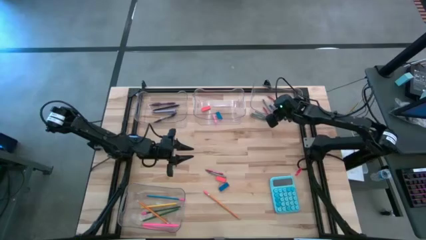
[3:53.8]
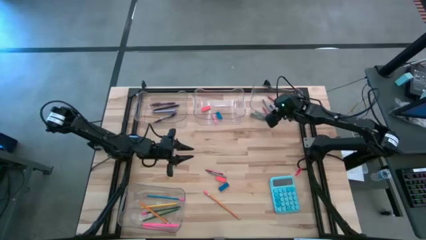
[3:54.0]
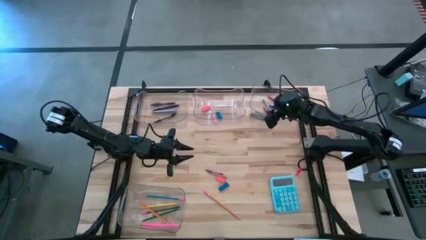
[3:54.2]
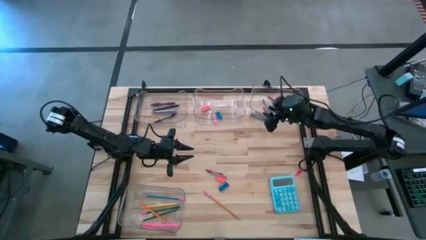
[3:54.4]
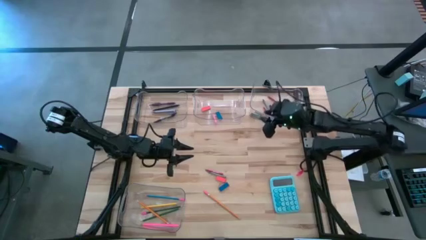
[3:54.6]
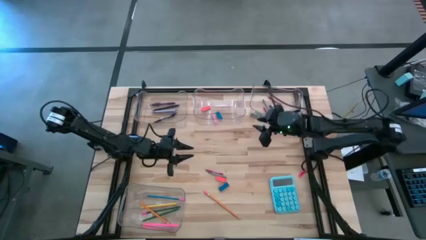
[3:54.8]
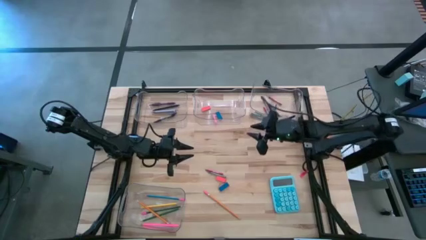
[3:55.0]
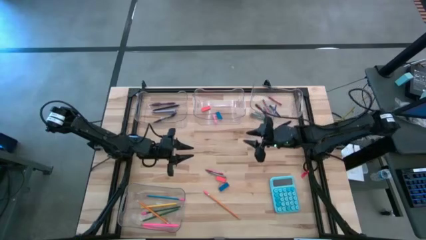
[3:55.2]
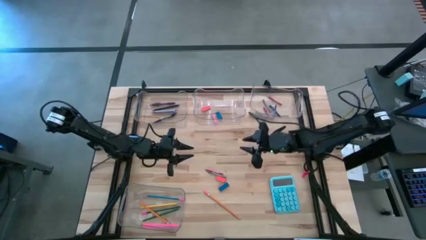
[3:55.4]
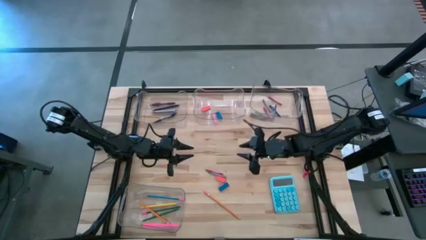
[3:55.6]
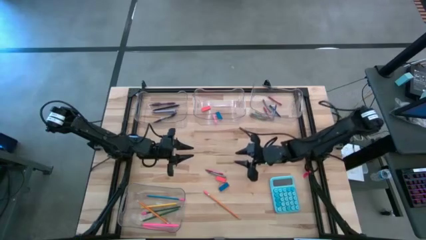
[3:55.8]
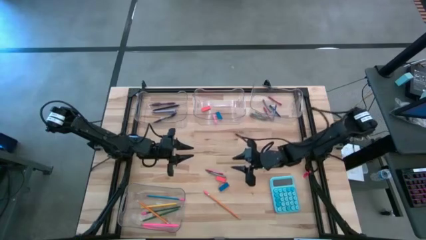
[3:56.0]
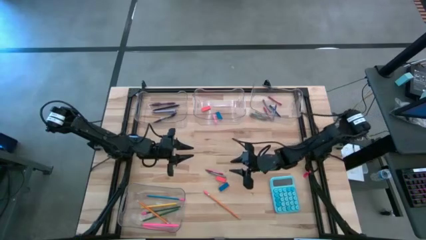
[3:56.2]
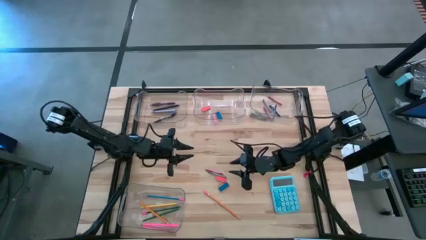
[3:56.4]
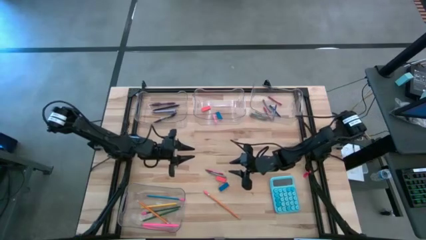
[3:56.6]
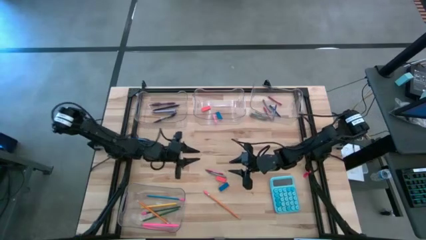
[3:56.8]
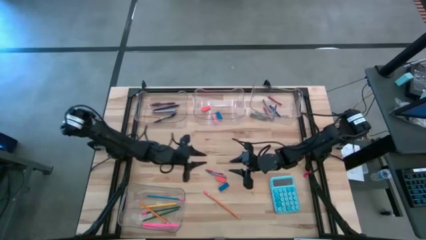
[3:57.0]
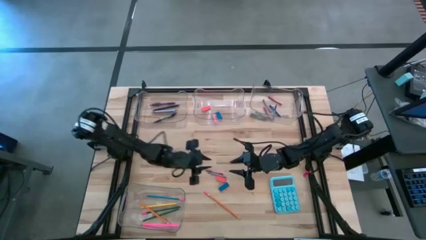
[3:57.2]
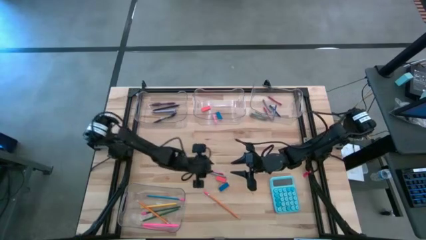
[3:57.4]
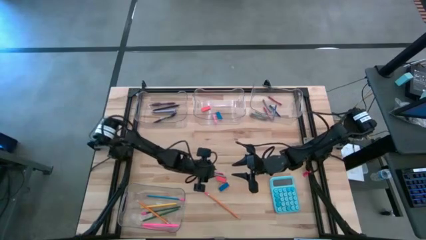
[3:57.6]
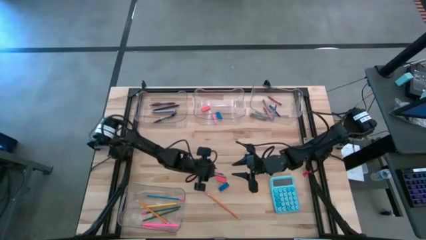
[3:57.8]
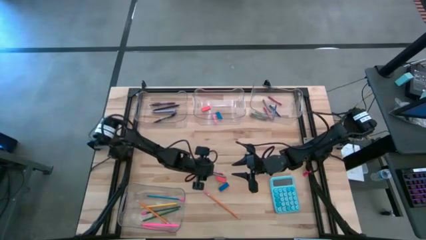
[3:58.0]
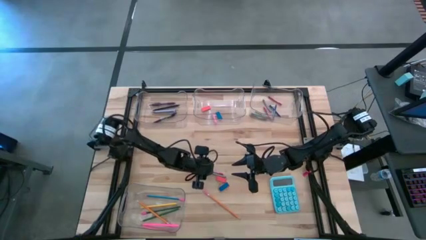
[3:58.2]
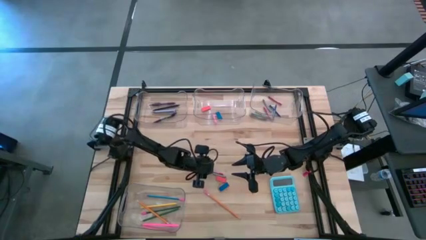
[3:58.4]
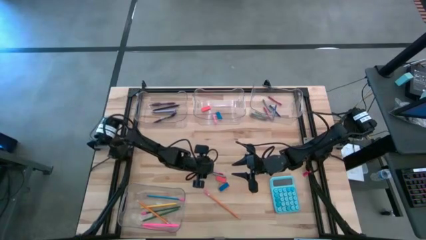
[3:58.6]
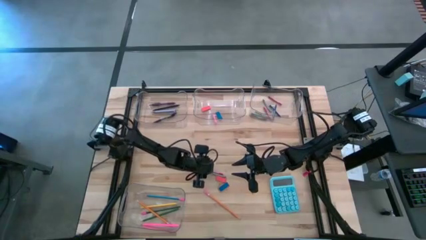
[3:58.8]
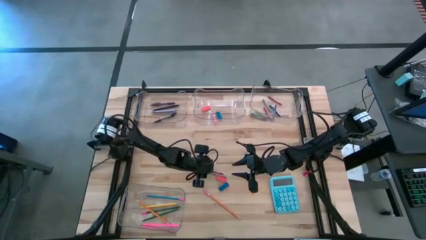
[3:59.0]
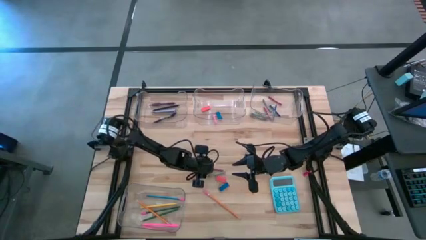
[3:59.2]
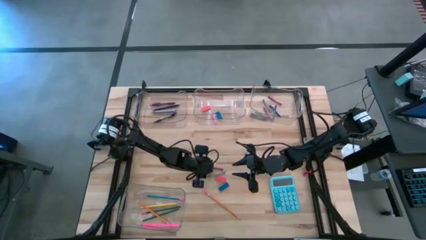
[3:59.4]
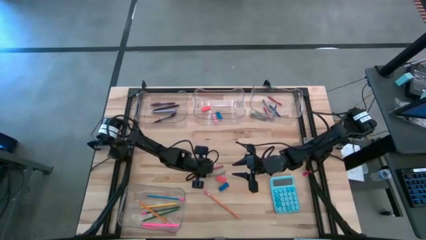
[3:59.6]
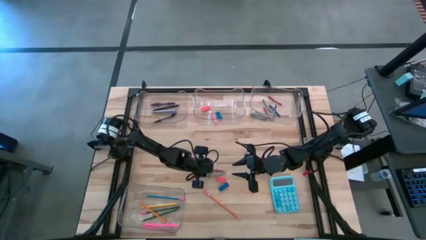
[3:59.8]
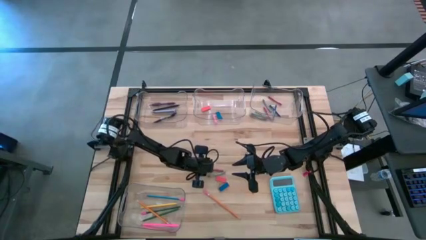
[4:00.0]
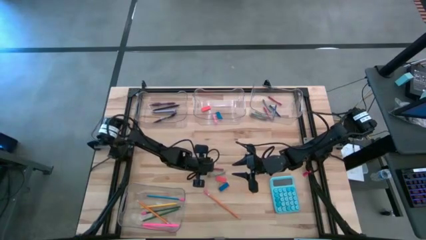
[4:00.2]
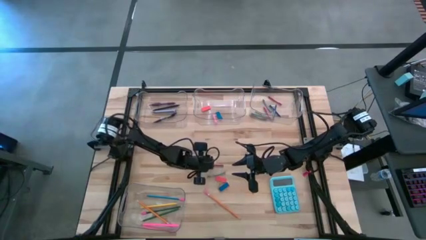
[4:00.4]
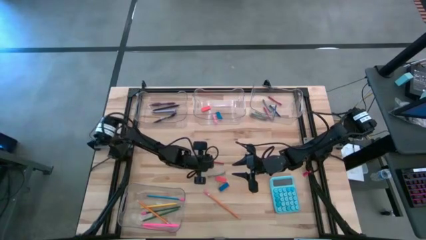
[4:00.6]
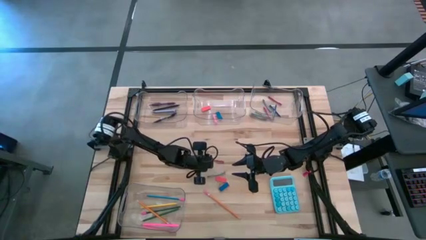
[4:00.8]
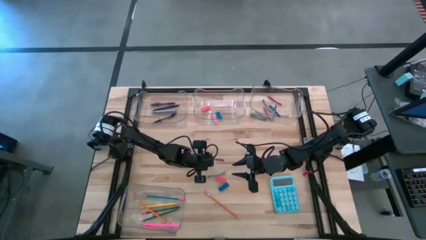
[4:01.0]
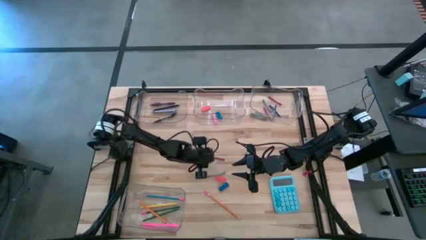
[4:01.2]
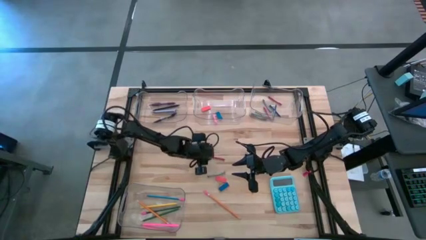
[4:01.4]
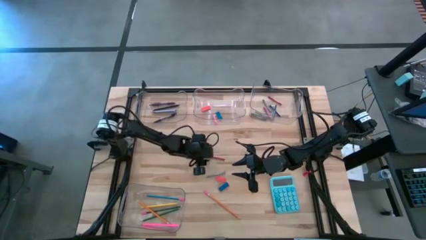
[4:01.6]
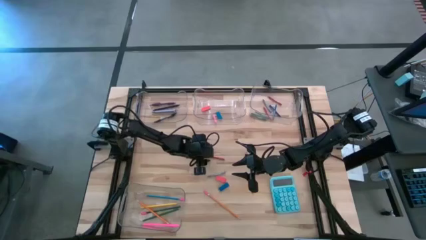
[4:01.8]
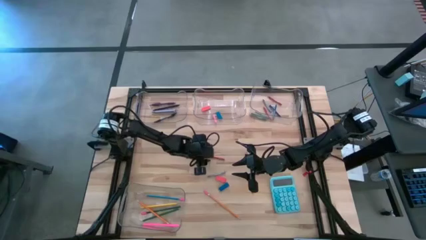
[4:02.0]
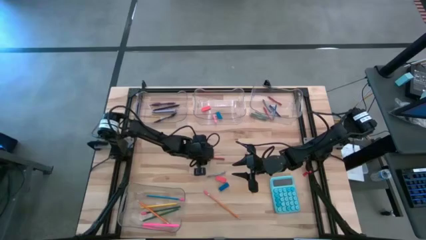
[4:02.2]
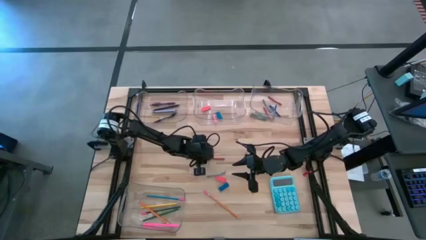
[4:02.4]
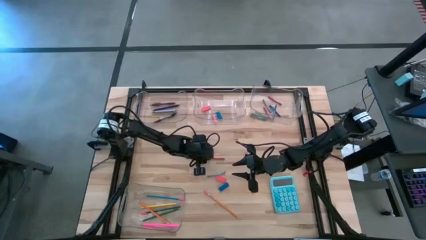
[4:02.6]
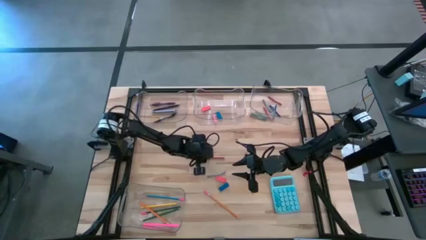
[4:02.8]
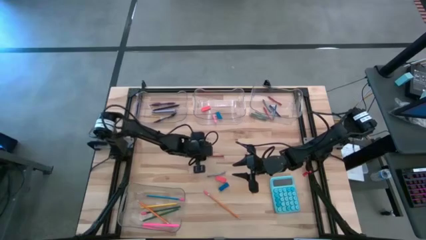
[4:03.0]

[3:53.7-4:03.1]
Task: Sort crayons/erasers/pens/pencils in bins
Put the red crayon into the top right transparent bin

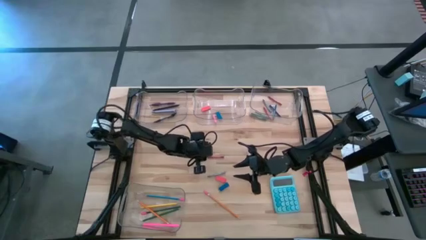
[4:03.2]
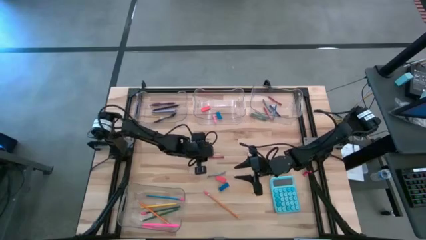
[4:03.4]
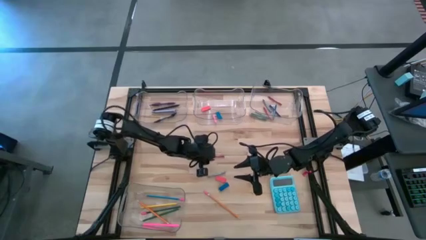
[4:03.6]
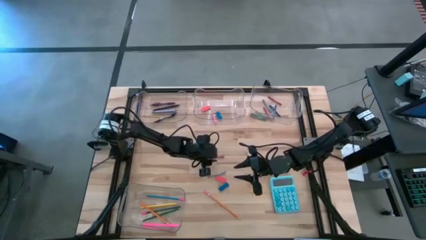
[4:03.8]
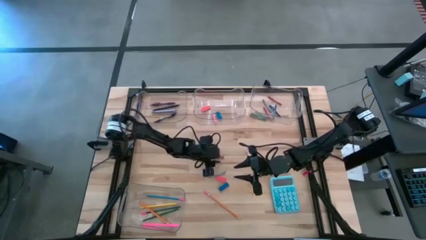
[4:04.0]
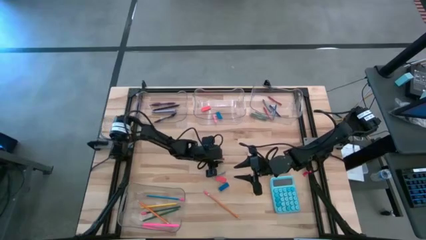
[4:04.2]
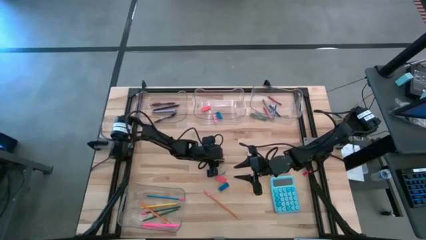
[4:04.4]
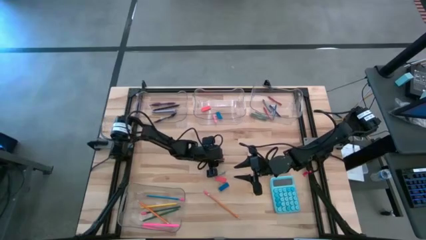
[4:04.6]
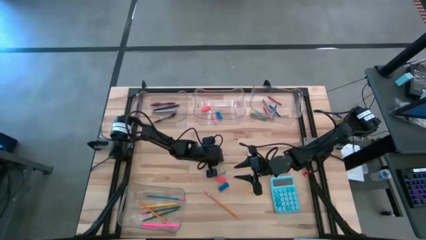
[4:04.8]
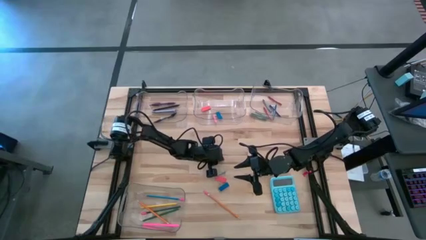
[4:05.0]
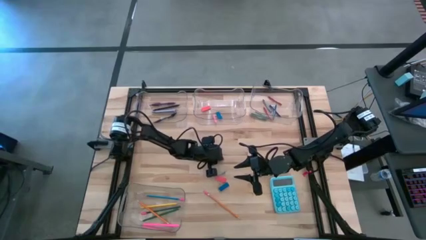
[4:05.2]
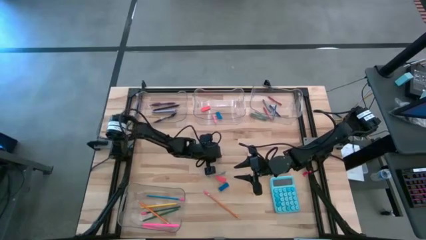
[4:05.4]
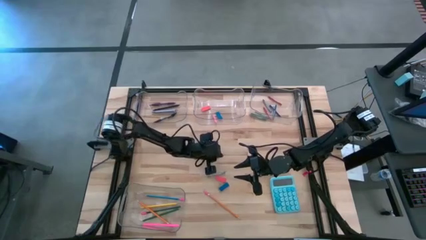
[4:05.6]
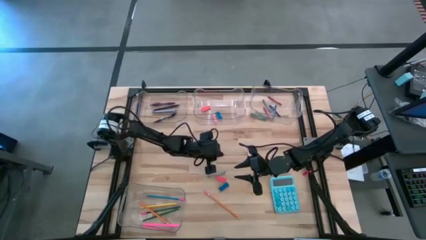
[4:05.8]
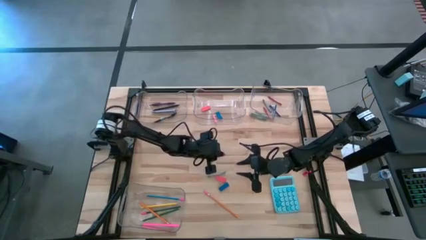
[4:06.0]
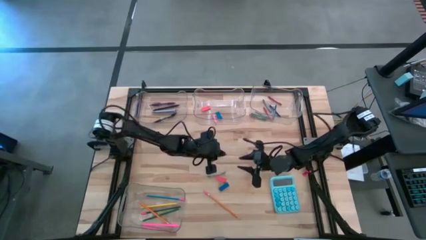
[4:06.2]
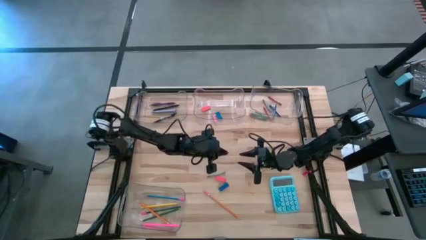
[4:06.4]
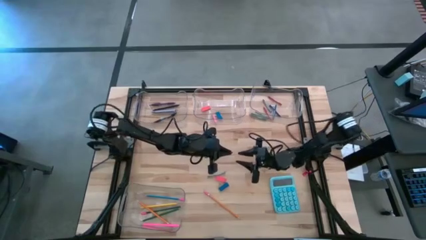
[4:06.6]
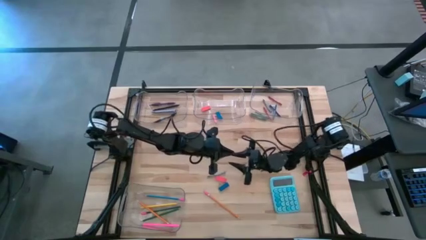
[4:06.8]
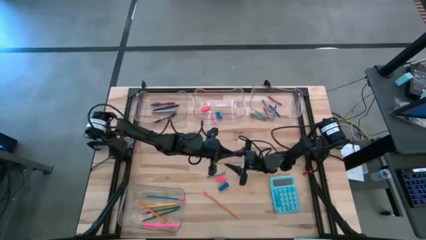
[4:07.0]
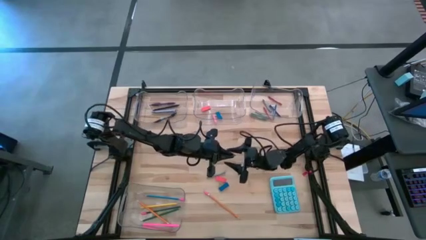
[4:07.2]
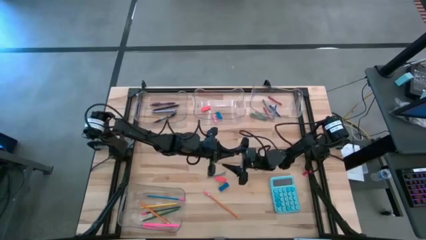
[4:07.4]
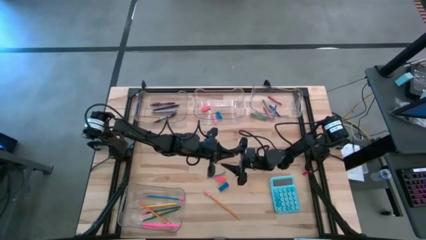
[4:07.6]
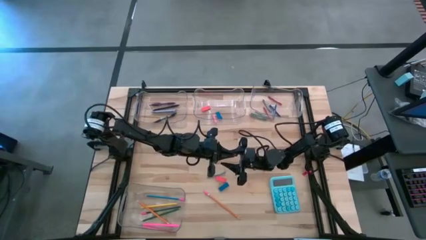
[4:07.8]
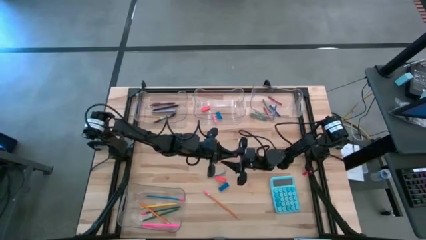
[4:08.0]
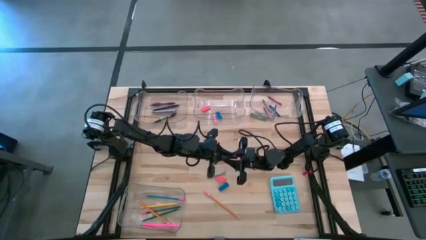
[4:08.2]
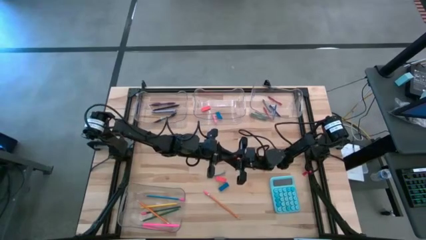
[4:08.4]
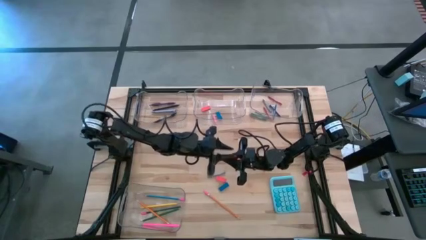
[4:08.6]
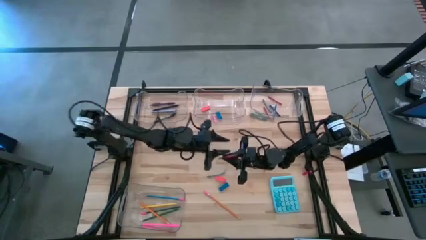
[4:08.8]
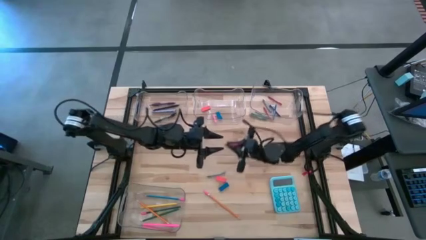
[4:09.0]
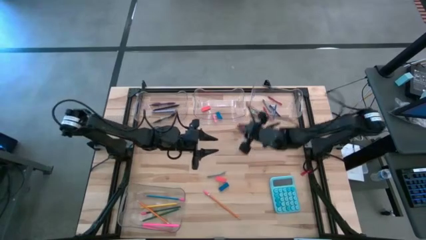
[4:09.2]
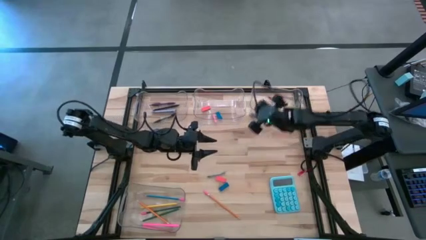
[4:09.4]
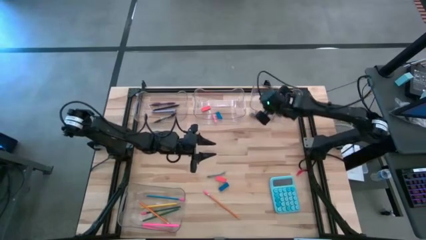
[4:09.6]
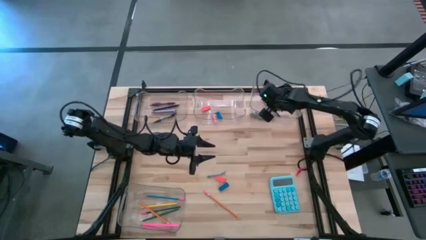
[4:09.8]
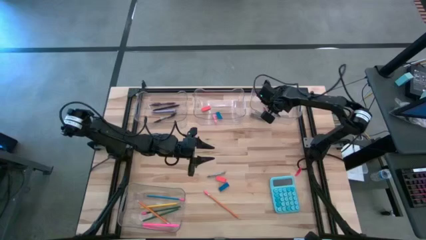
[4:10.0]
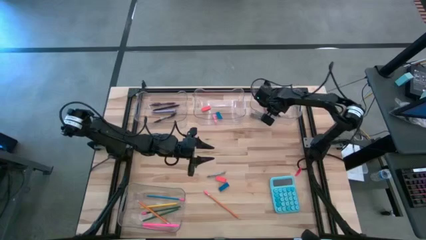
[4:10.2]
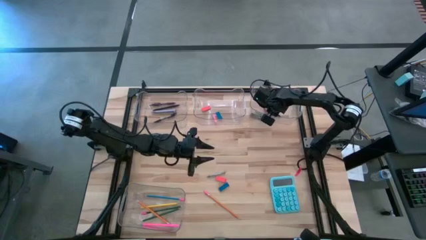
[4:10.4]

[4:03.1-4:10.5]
Put the red crayon into the top right transparent bin
